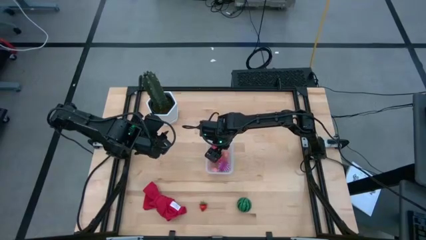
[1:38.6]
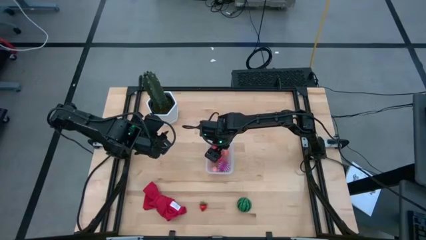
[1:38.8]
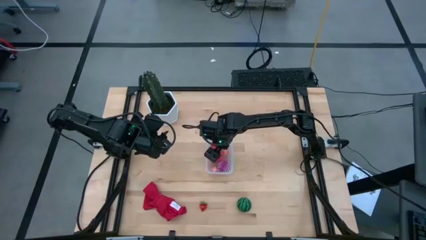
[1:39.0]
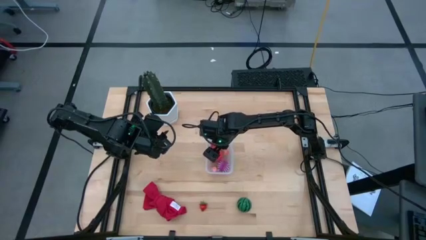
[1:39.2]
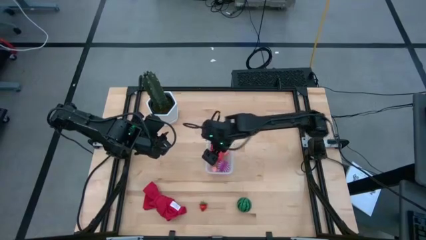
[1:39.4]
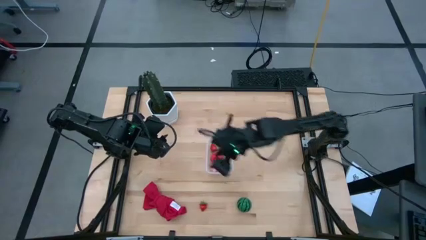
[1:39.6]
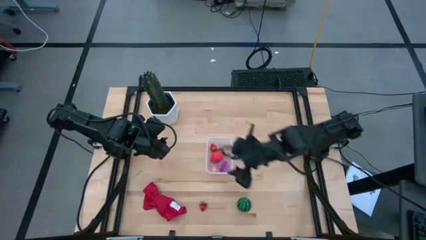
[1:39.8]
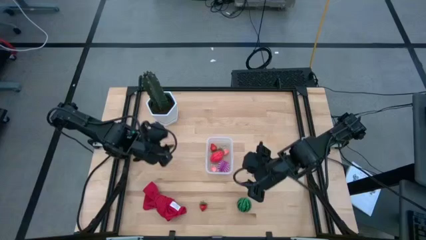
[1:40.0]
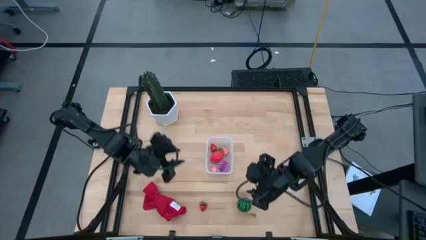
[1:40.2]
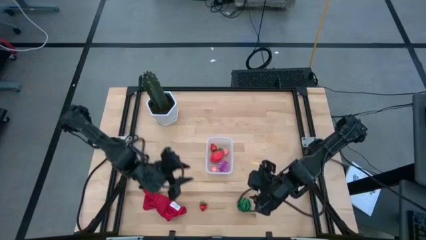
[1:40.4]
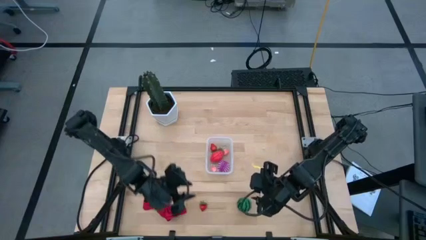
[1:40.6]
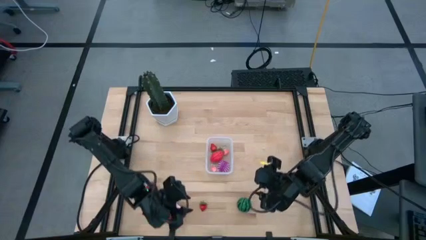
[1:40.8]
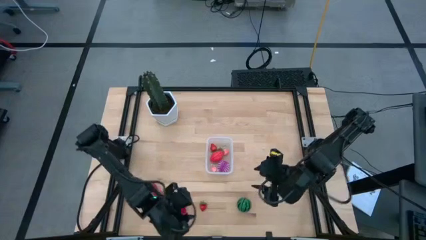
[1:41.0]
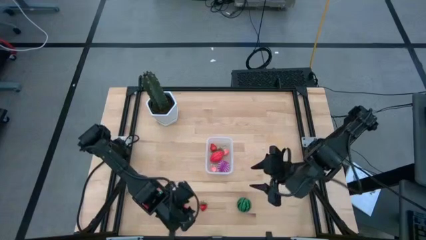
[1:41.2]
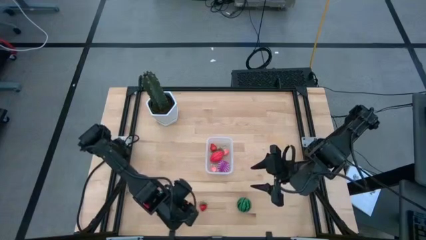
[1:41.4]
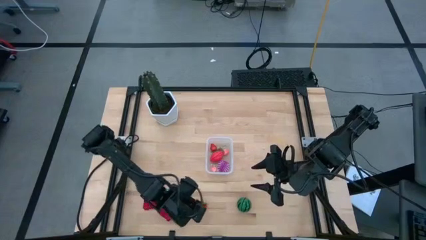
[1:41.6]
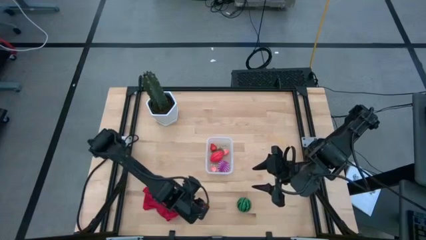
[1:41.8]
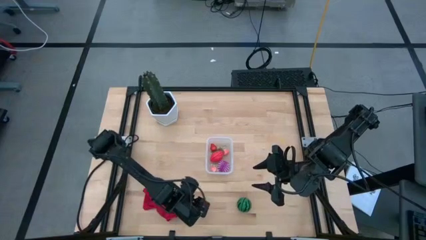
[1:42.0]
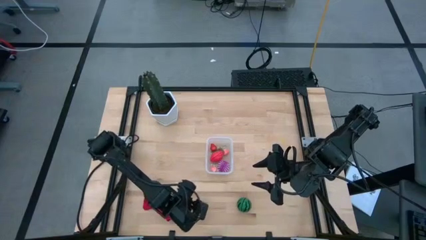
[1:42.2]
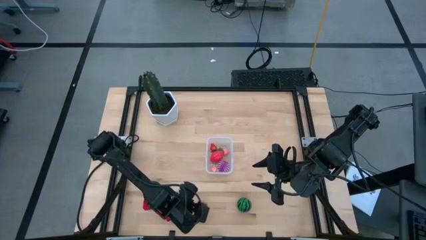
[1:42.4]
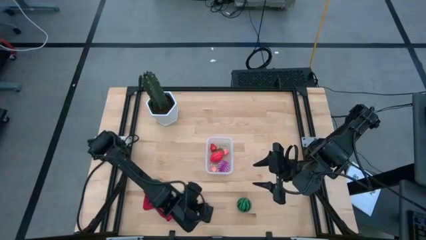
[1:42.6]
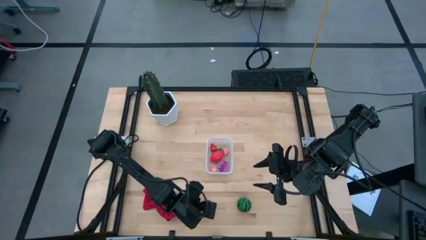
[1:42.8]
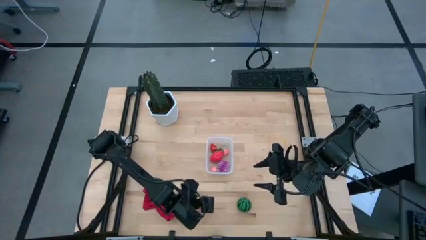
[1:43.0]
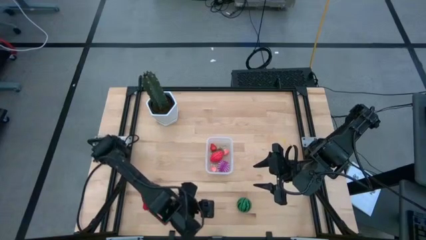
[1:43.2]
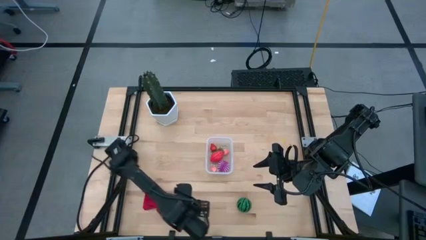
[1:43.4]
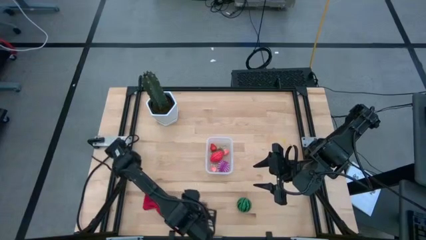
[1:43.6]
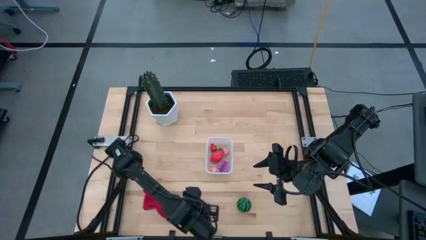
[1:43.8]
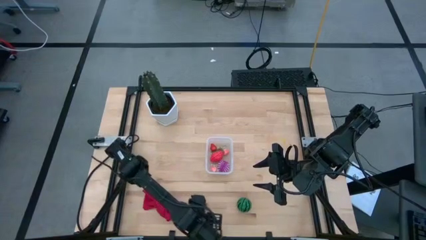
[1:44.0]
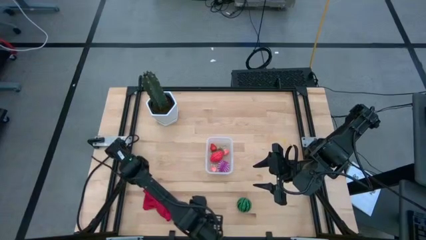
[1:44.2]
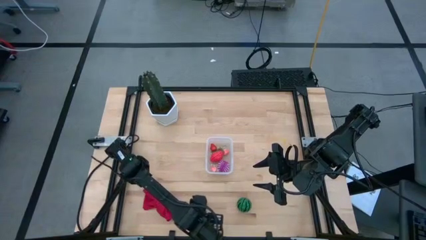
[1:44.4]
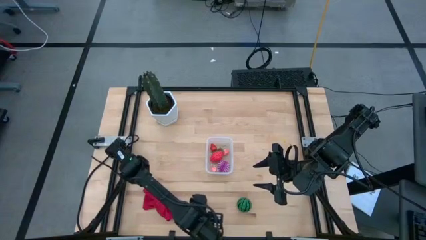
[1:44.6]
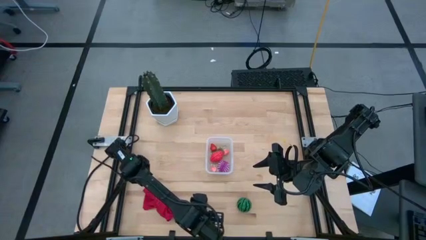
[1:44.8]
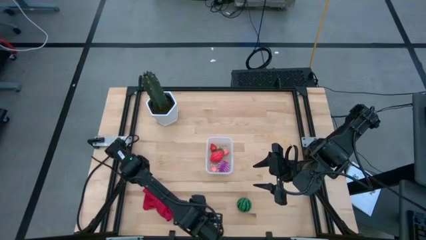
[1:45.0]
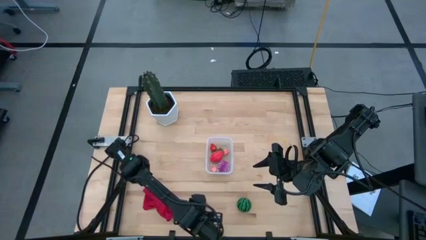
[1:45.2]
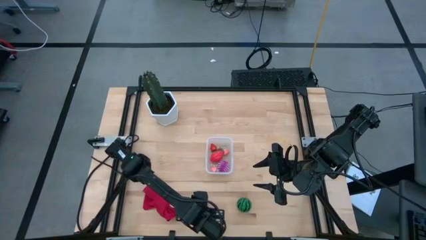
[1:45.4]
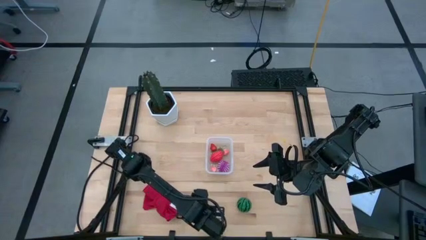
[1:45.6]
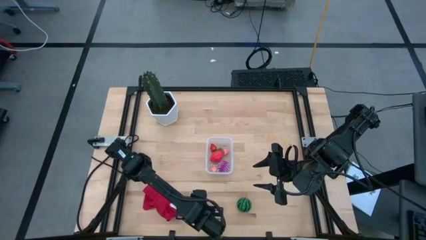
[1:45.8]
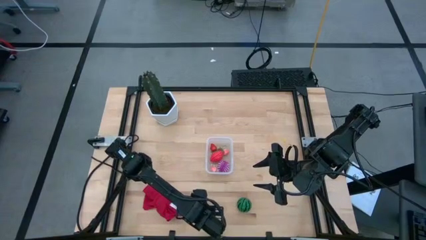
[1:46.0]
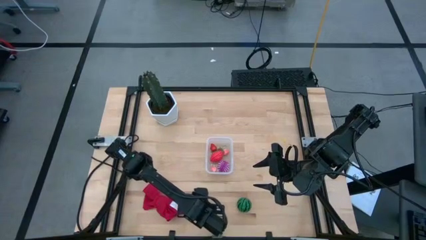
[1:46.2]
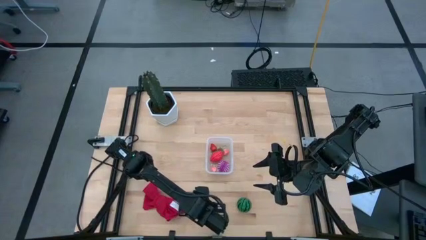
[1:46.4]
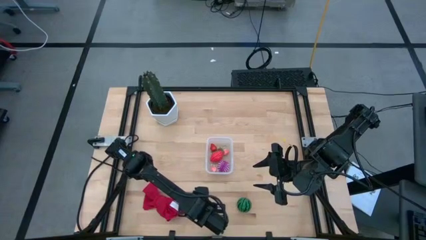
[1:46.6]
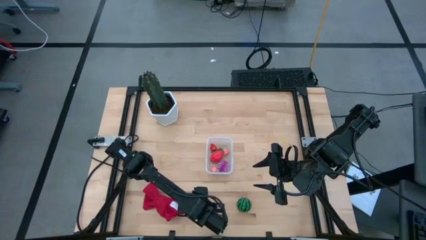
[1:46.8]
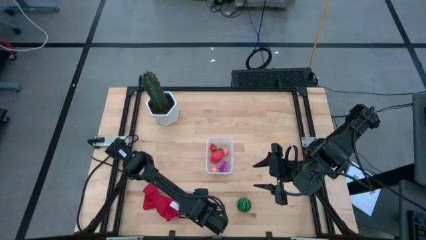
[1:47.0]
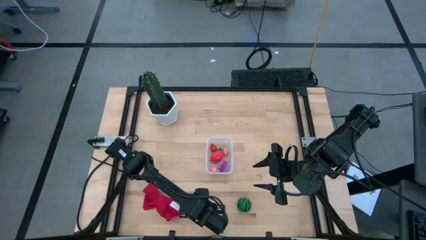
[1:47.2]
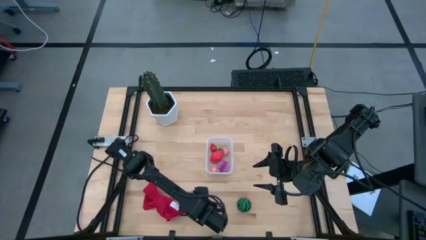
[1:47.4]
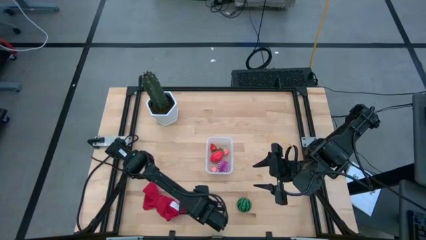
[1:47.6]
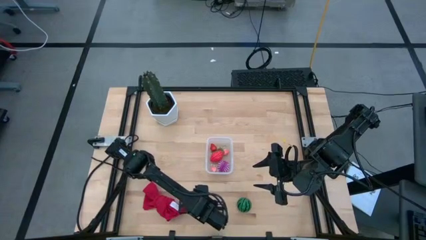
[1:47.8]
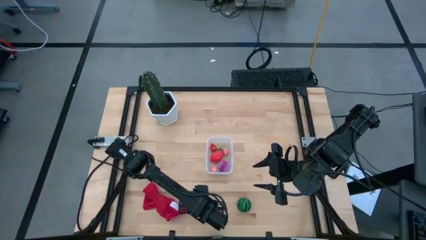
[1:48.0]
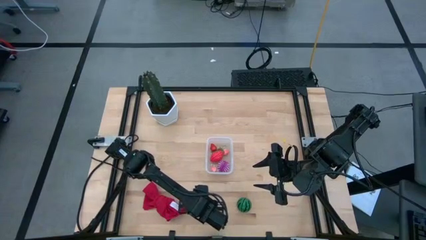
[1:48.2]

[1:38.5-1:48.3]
Task: Pick and placing Produce into tupperware
Put the red strawberry into the transparent bin

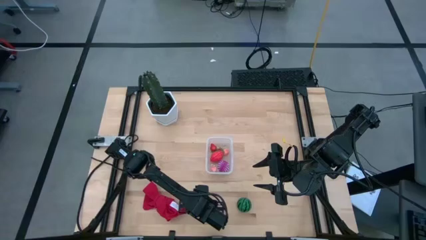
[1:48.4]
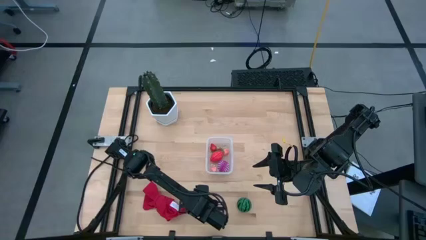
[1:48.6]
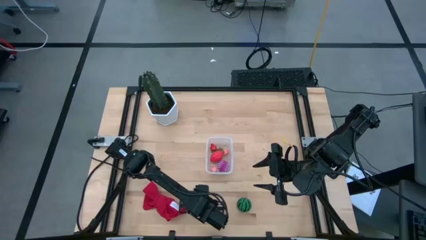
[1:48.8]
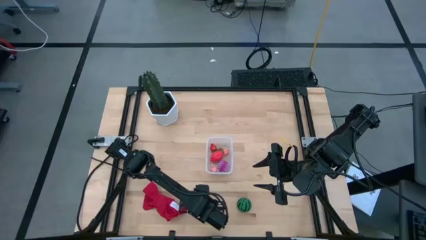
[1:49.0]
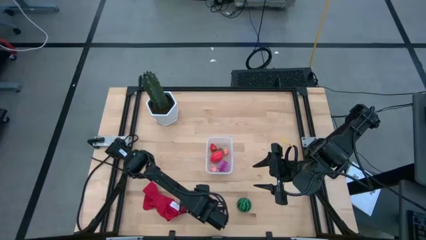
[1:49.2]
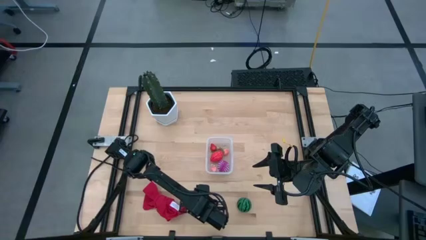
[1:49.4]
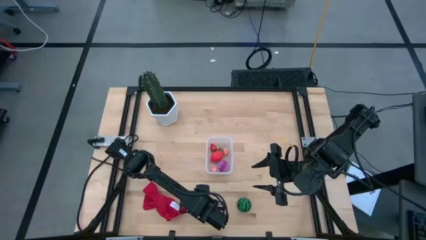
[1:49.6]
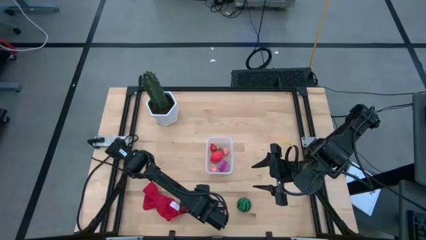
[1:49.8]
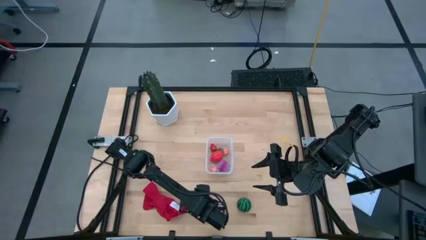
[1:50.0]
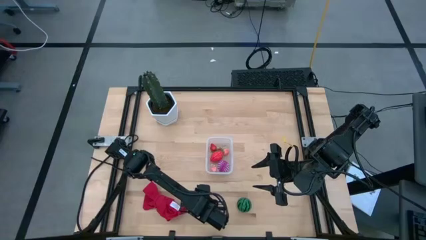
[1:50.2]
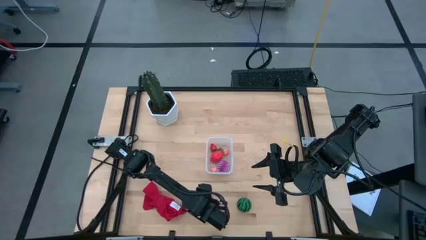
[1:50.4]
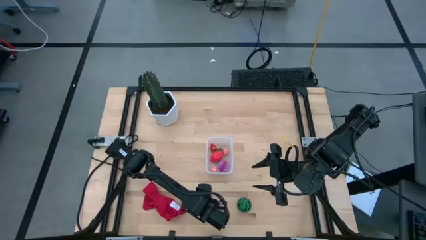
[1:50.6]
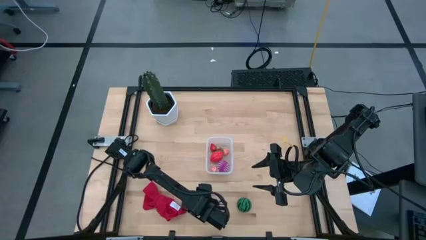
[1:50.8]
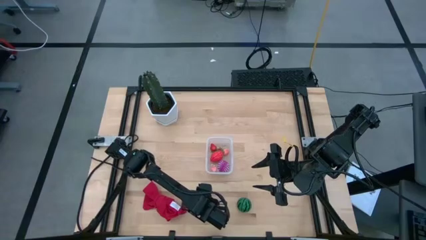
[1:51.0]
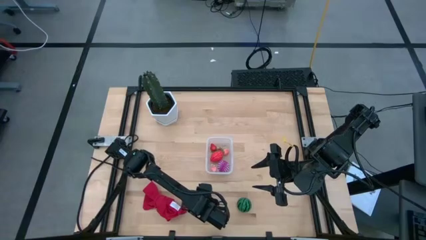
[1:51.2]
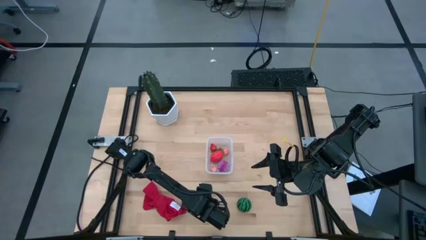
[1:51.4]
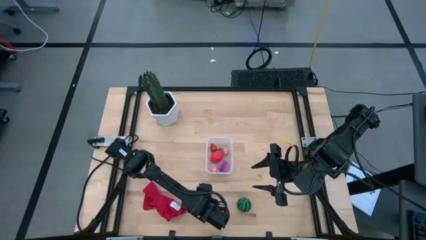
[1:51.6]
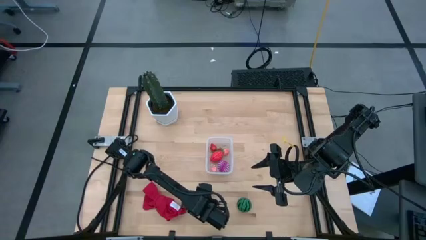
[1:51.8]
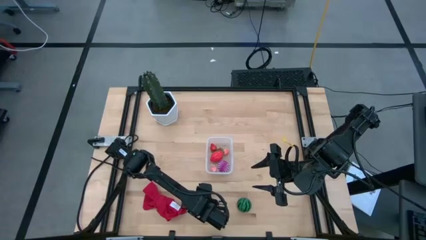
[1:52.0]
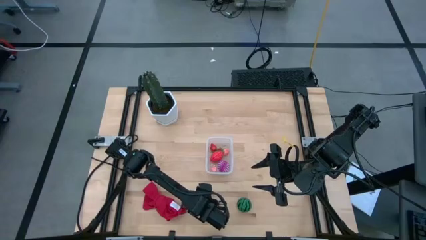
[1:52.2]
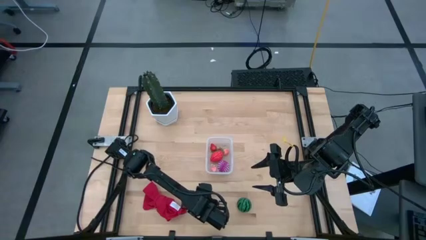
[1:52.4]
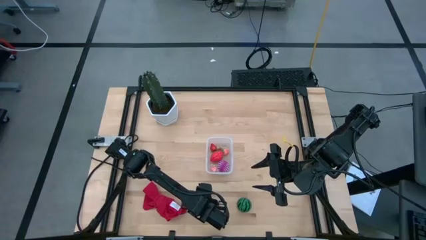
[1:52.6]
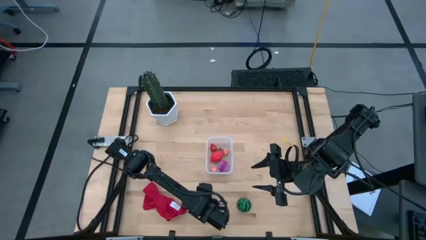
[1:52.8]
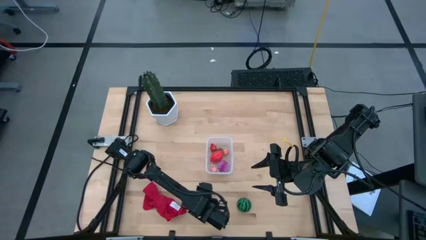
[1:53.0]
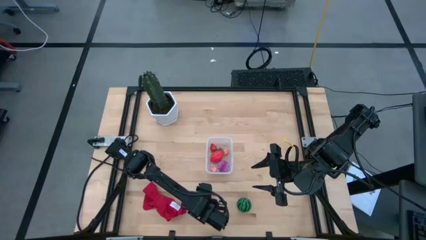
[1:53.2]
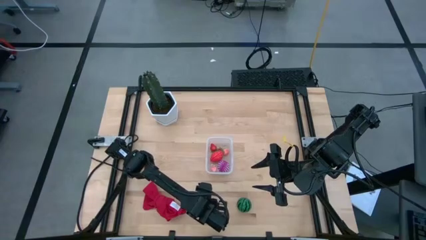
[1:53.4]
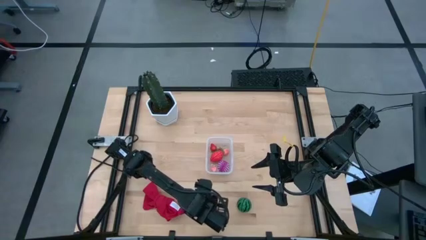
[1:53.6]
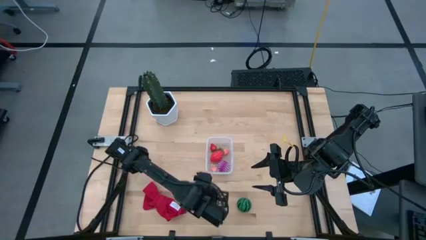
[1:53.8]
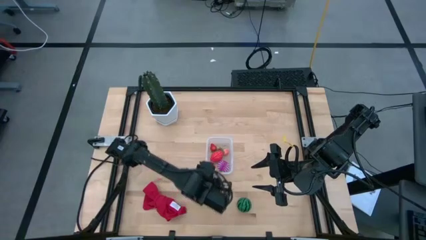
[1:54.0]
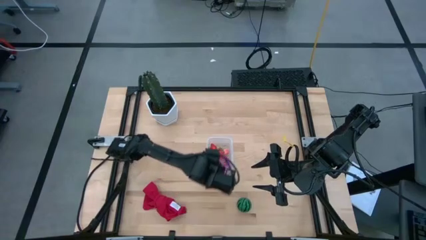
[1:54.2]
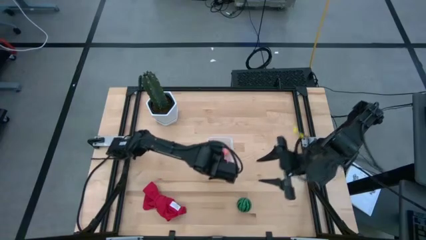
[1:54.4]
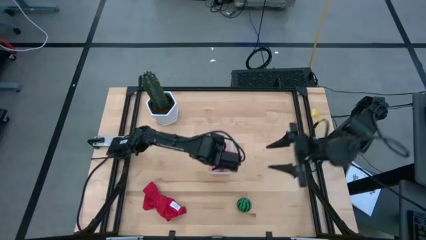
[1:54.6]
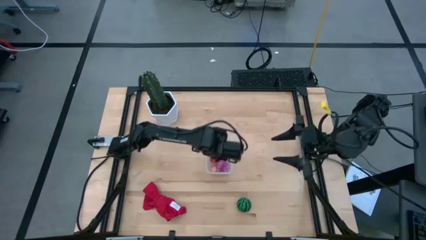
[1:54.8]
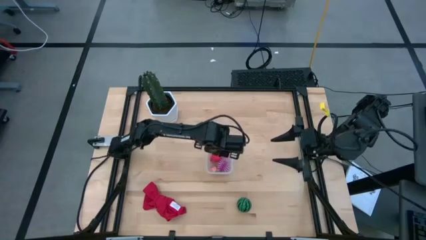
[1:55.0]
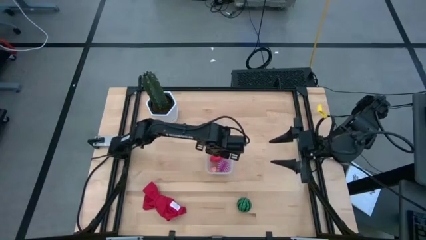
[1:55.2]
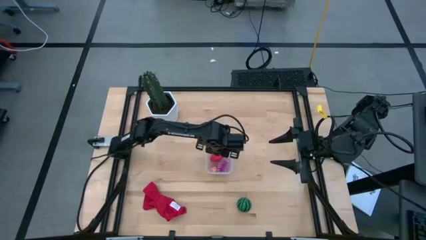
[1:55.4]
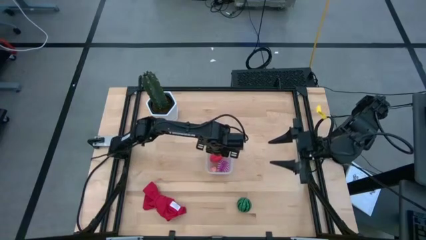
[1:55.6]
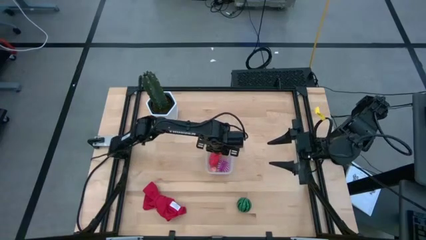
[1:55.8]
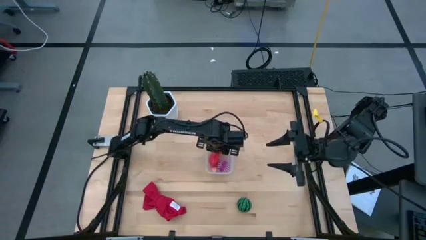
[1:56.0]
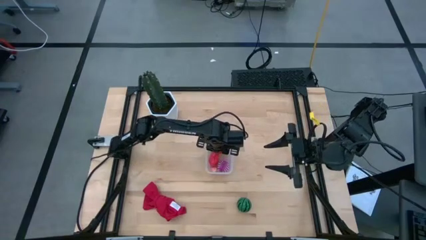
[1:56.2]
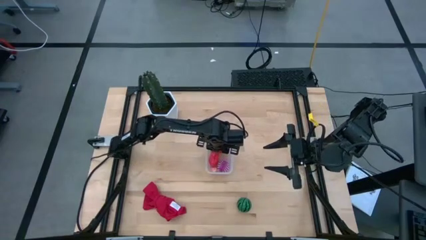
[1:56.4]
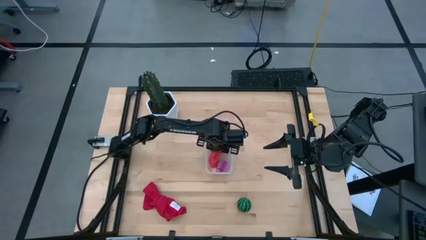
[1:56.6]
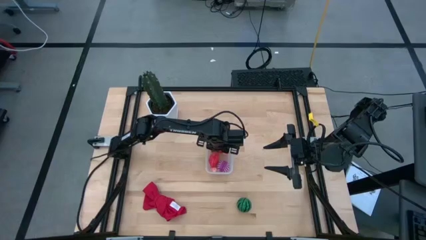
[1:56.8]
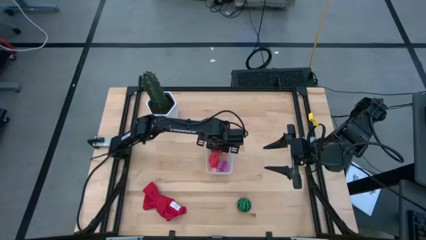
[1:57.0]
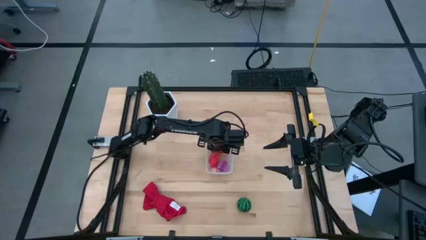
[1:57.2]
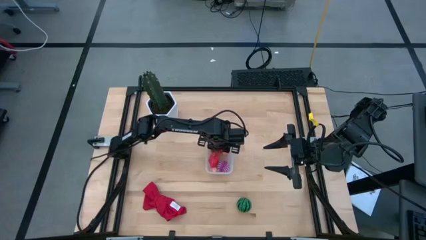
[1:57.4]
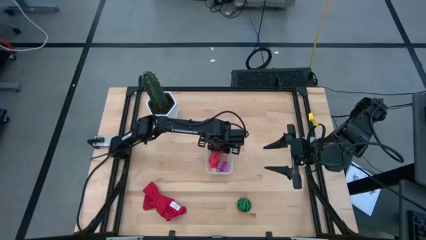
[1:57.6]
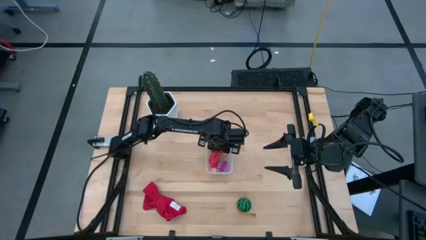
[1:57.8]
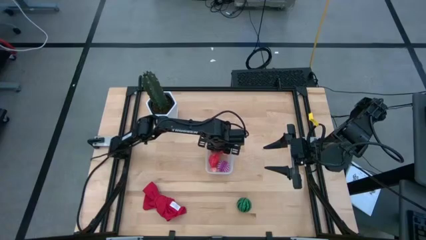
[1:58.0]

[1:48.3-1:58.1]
Put the red strawberry into the transparent bin
